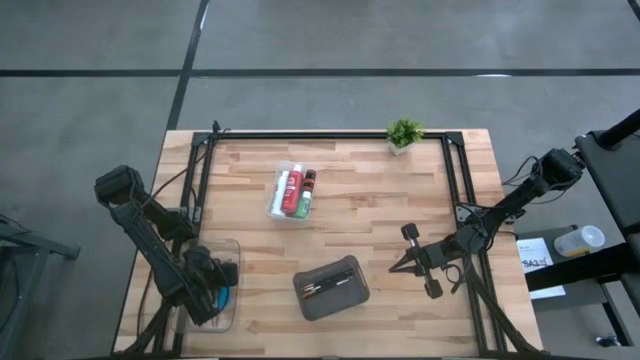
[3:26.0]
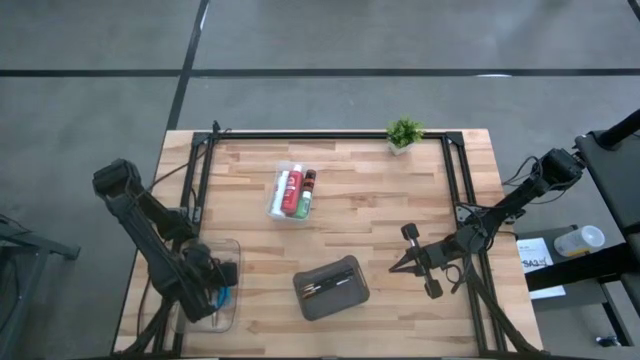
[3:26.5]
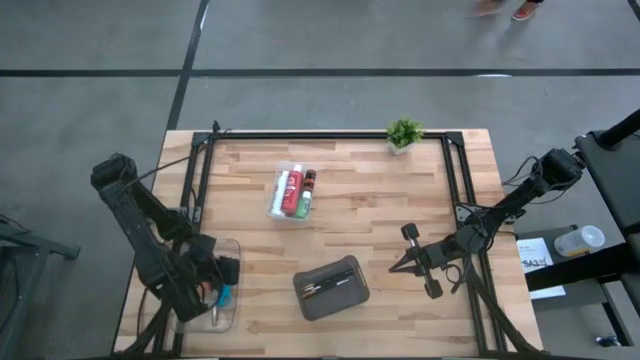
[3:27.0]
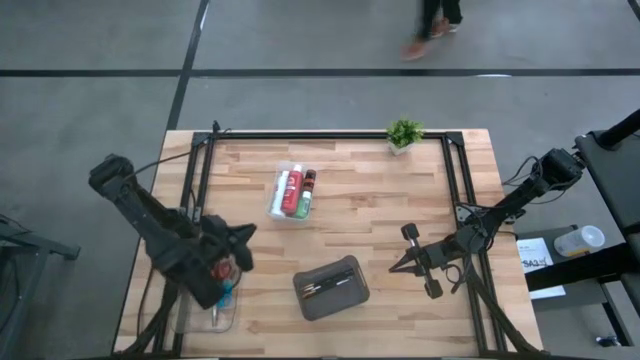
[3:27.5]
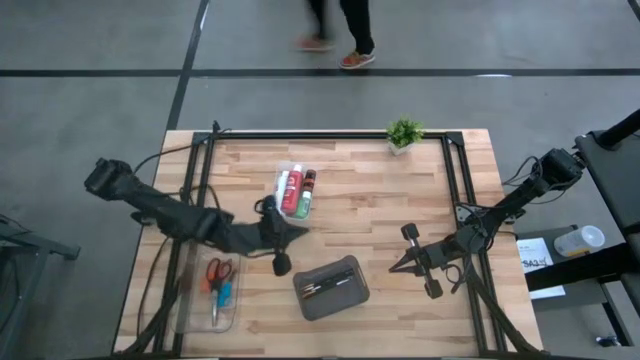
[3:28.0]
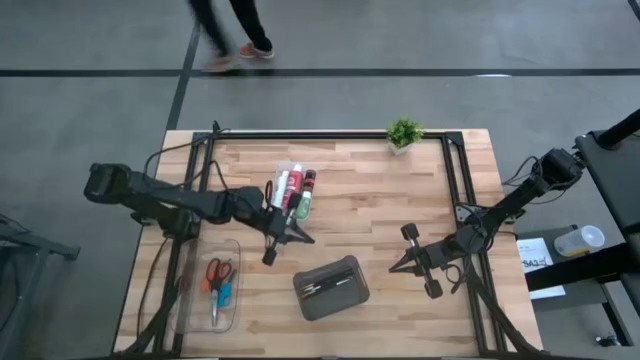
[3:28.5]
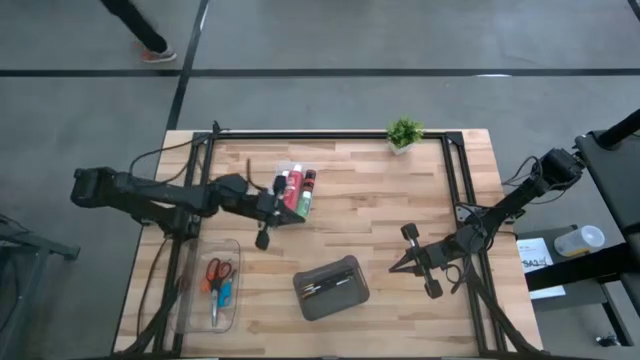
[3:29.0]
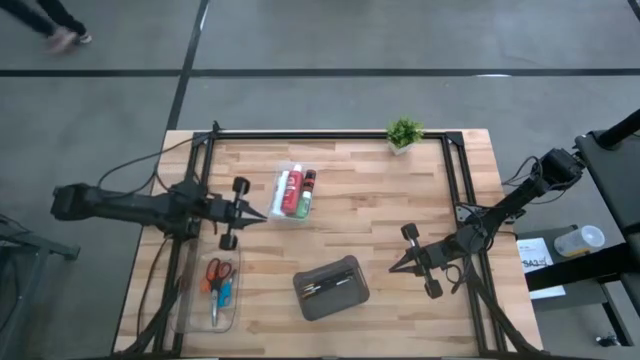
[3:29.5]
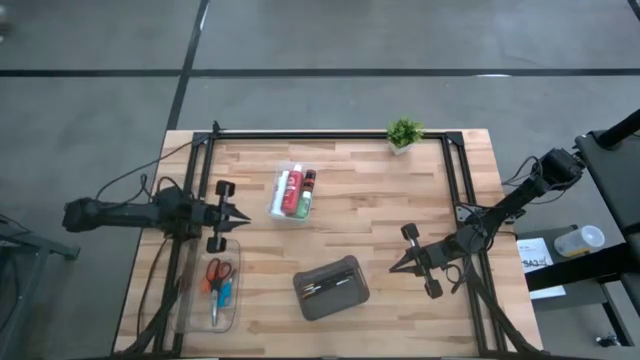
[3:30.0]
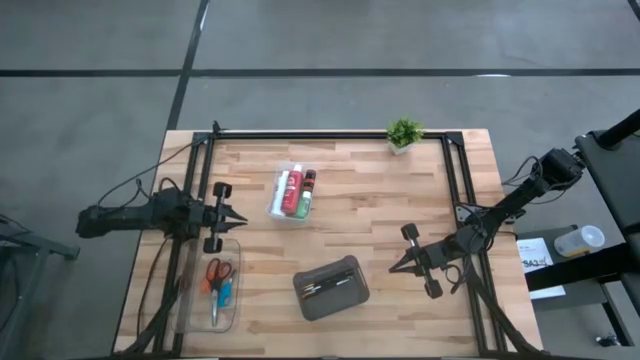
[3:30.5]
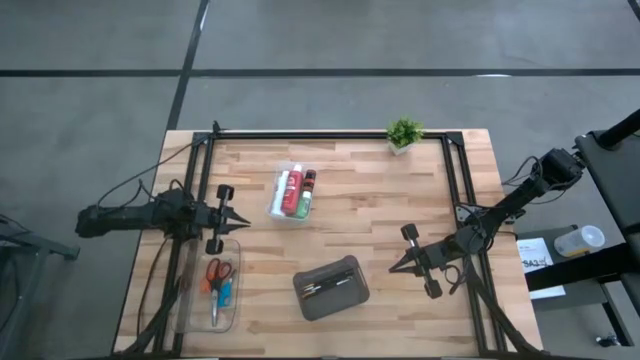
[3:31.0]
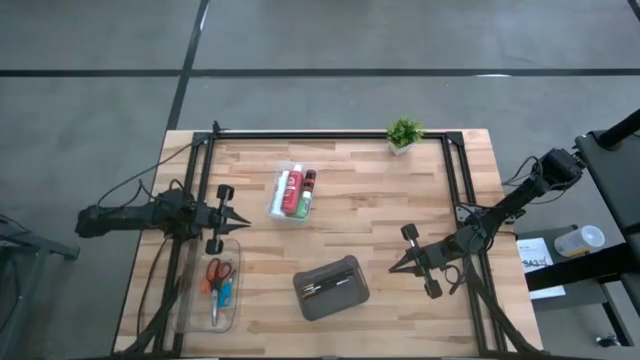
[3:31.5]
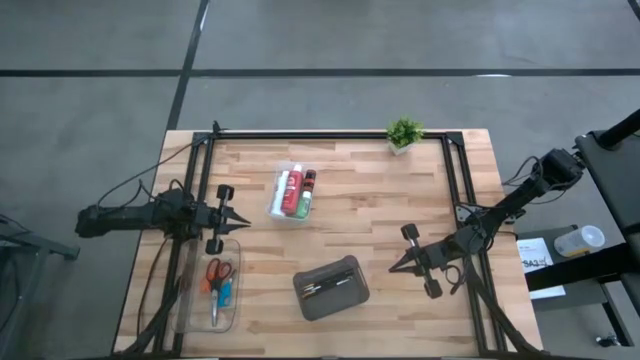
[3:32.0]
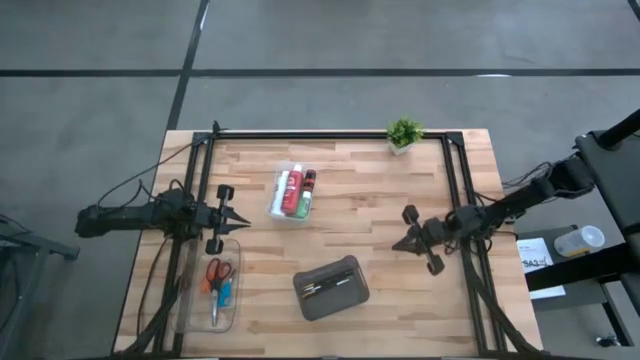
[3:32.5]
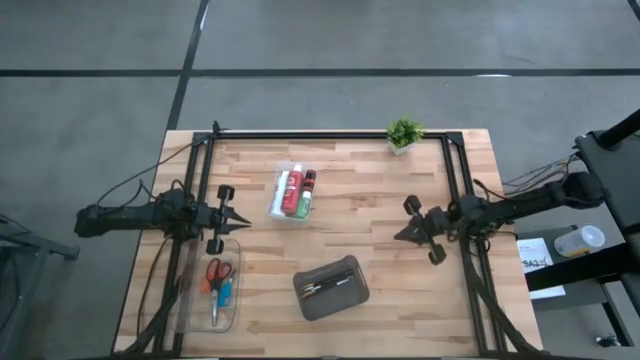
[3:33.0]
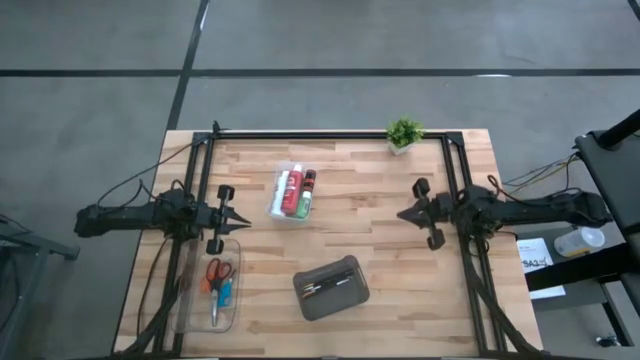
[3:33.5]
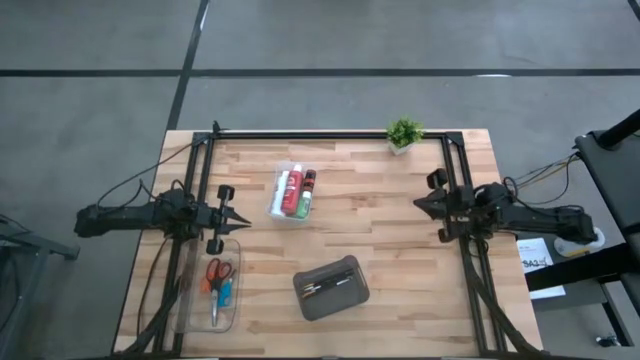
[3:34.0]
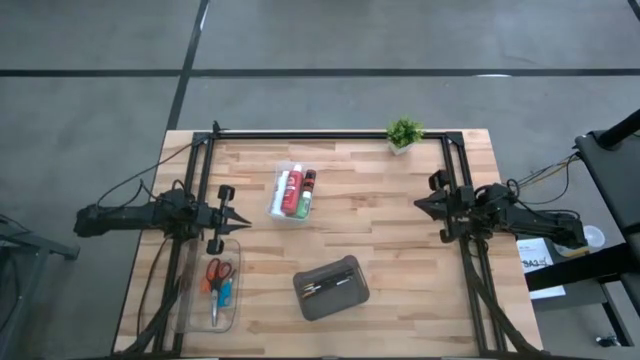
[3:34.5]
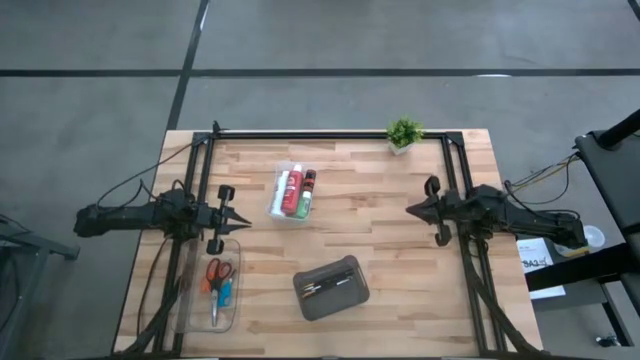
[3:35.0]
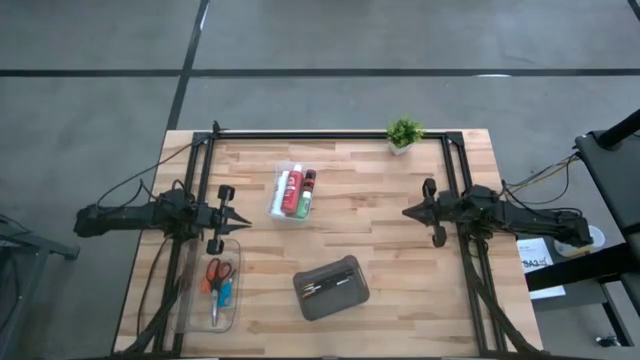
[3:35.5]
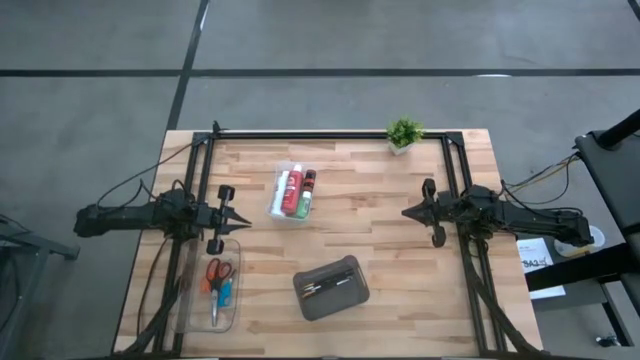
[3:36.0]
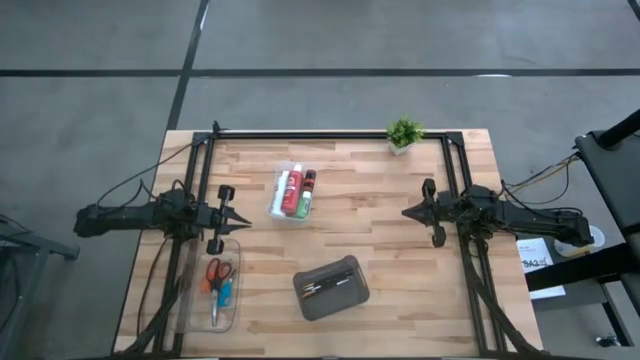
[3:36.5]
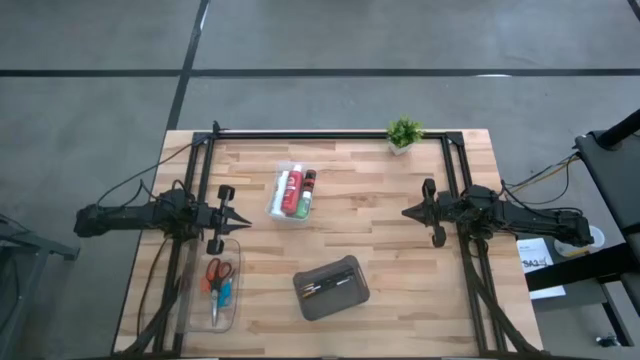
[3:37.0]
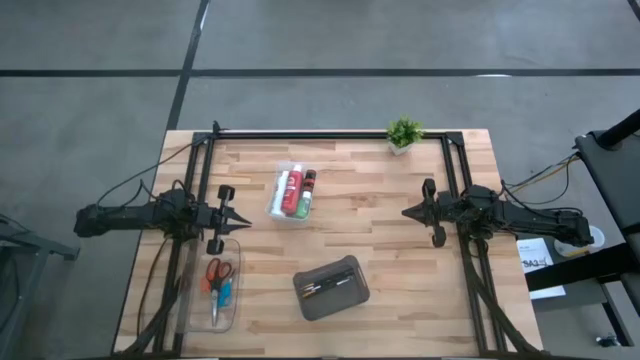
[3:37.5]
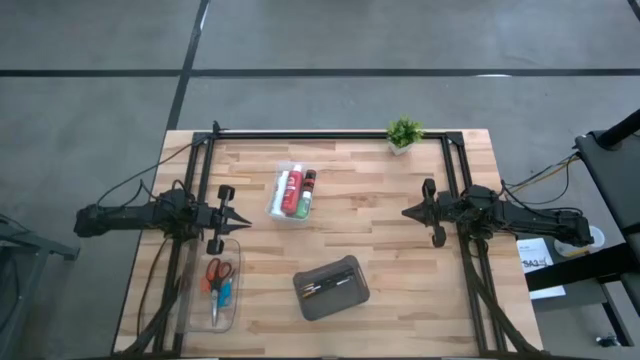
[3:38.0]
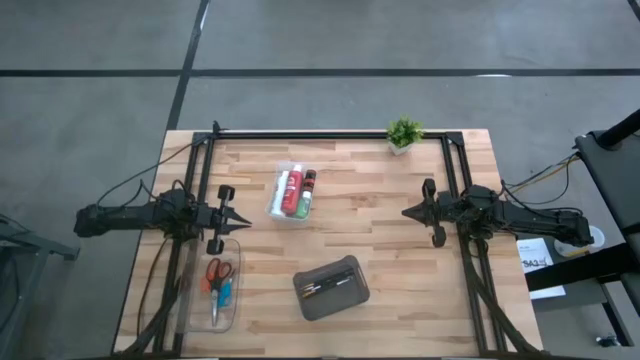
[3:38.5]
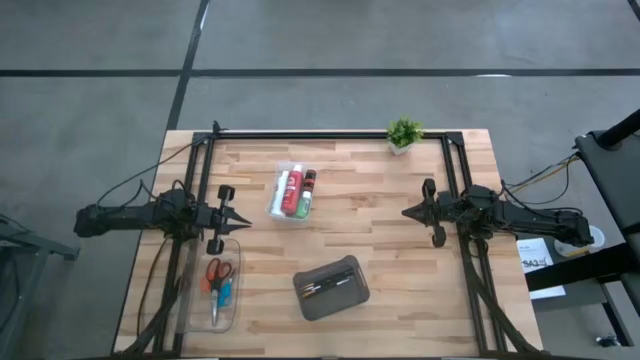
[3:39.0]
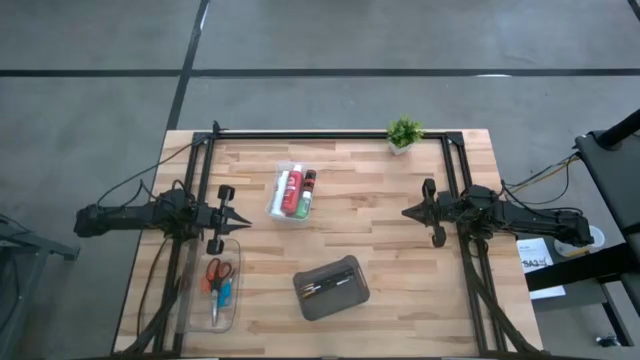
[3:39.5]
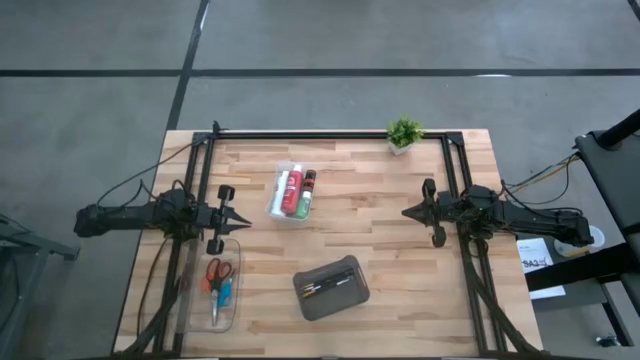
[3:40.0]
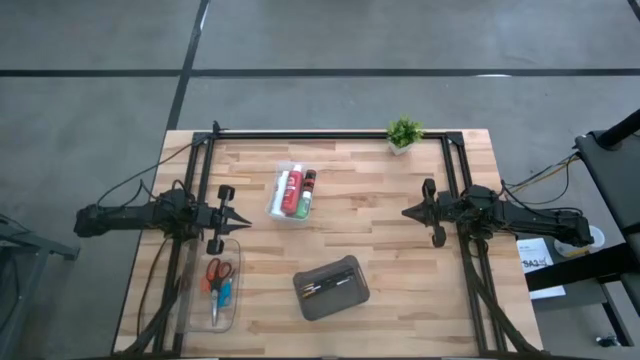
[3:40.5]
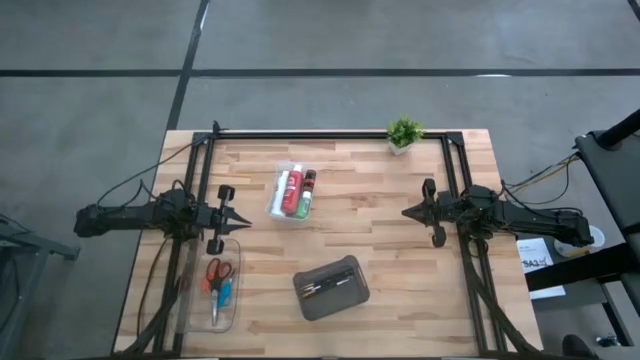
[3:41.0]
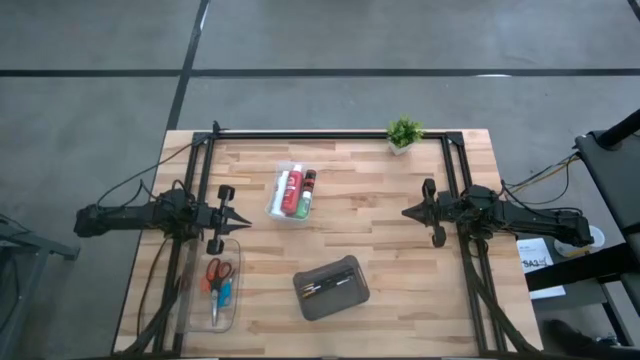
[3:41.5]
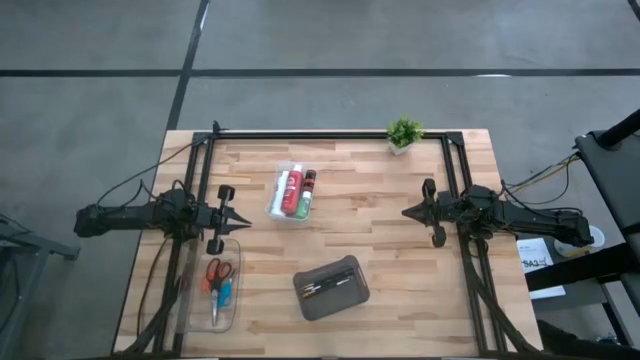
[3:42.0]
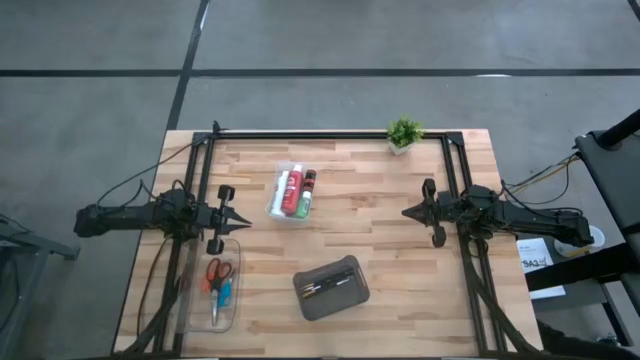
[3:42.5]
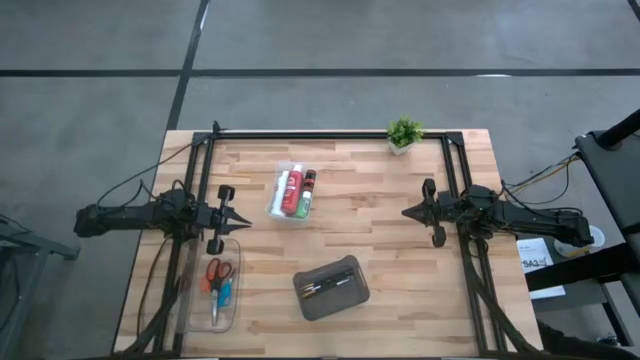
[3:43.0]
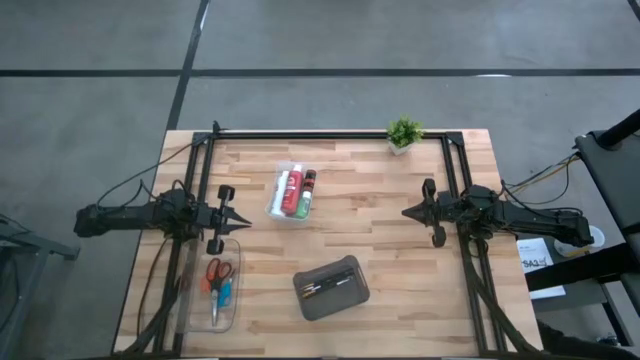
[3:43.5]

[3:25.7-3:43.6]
Task: Pick & Place Paint Supplies
Return to Home Position

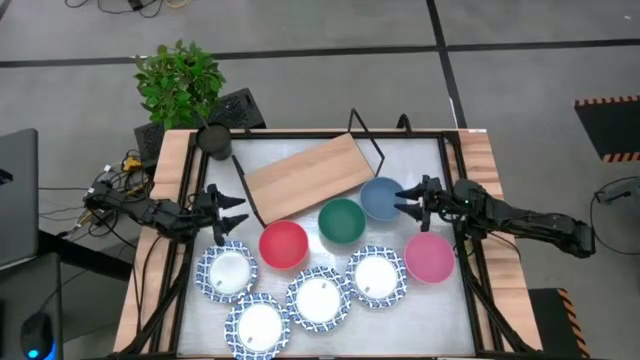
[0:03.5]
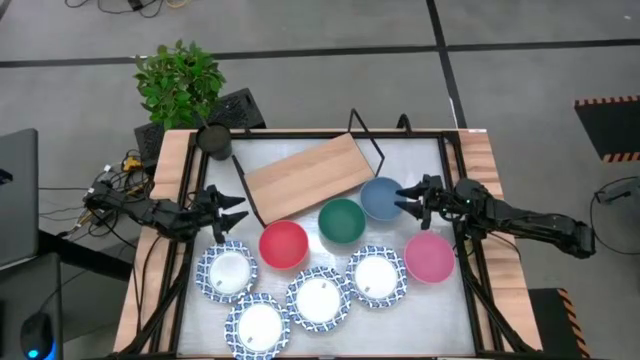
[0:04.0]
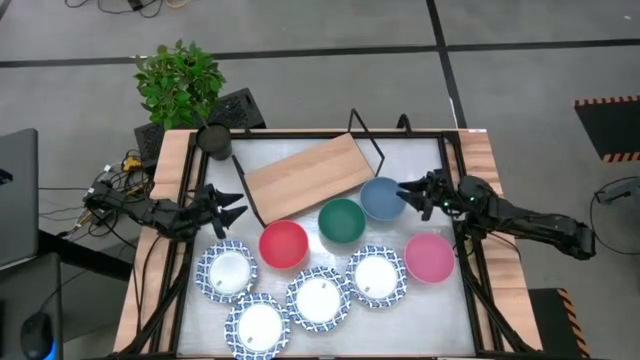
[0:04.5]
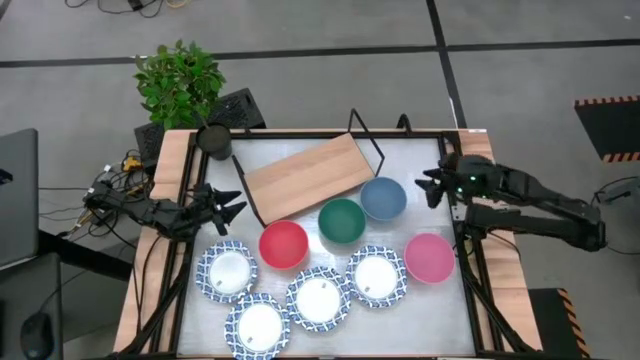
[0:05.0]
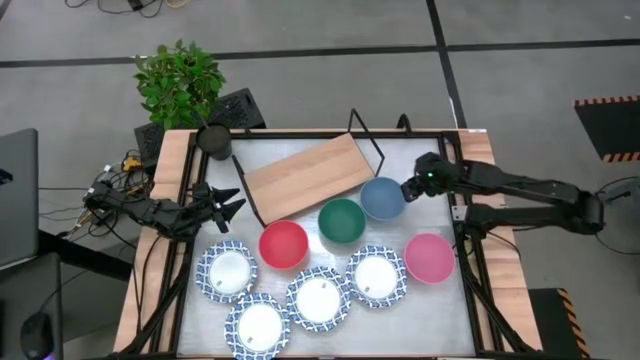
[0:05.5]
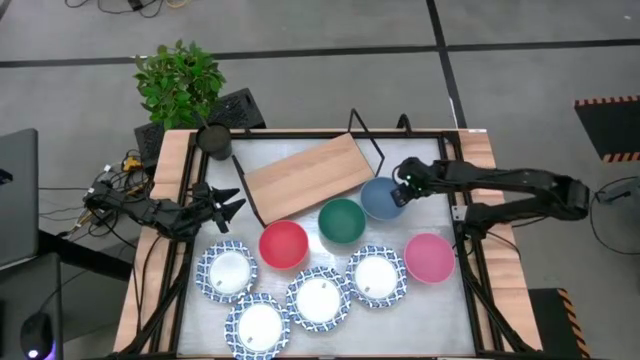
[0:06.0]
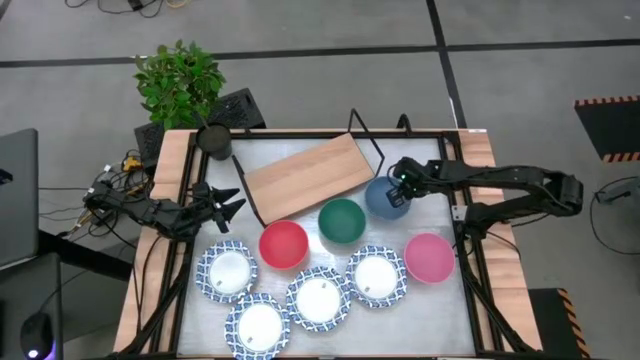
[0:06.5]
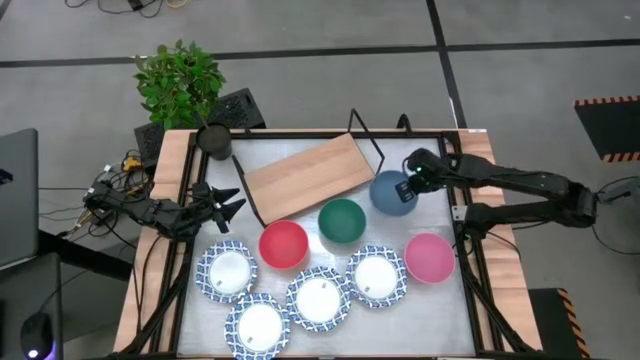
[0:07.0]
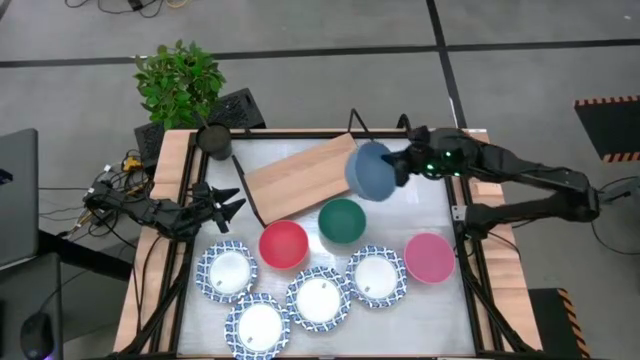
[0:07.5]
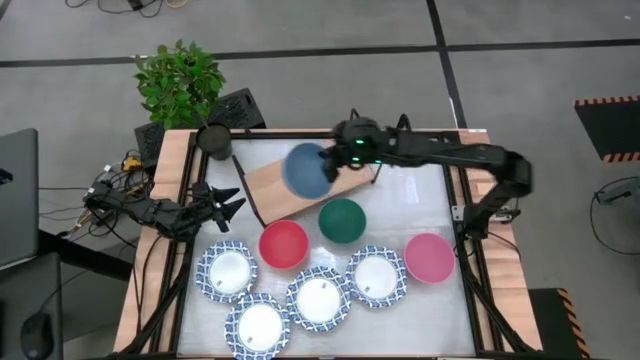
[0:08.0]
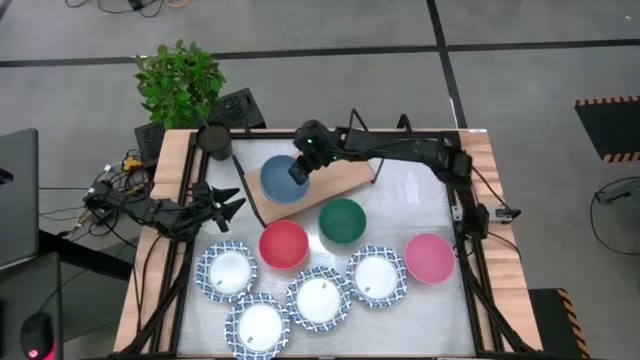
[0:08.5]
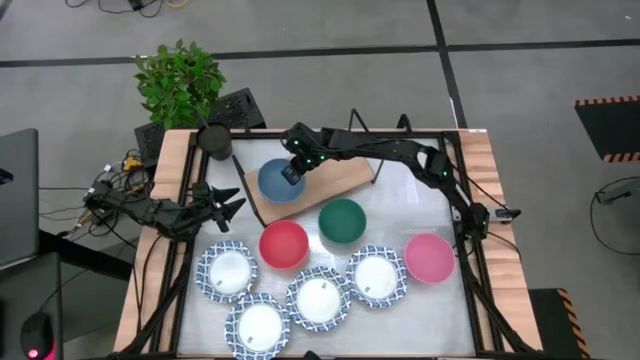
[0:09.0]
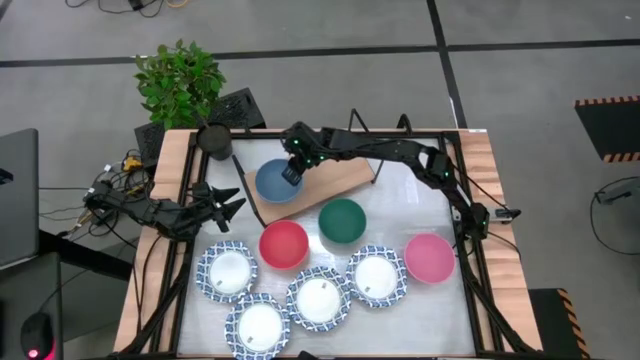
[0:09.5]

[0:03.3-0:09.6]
Task: Place and stack bowls onto a shelf
Put the blue bowl on the shelf
